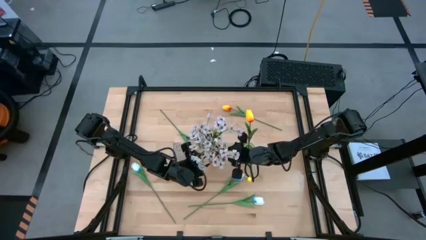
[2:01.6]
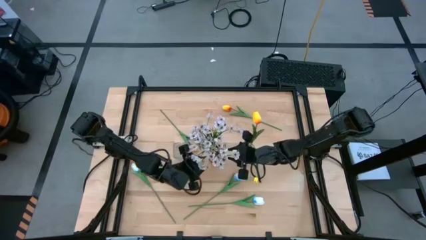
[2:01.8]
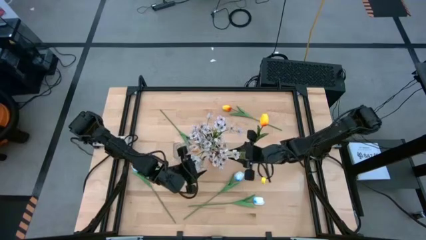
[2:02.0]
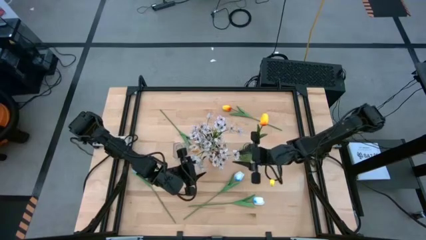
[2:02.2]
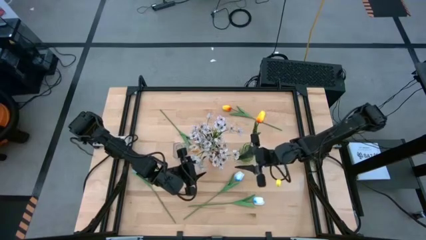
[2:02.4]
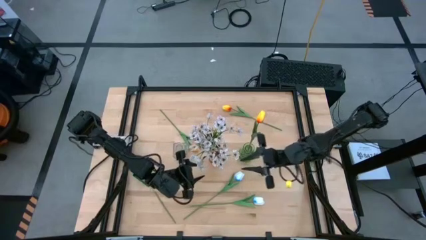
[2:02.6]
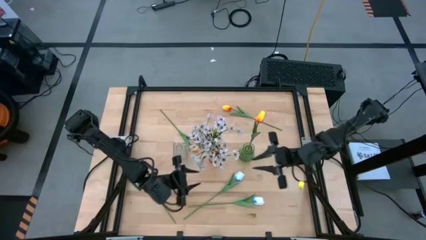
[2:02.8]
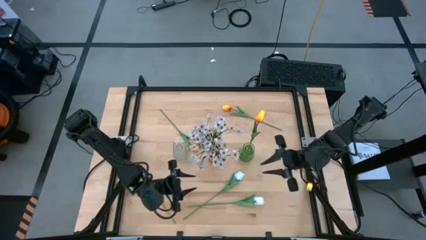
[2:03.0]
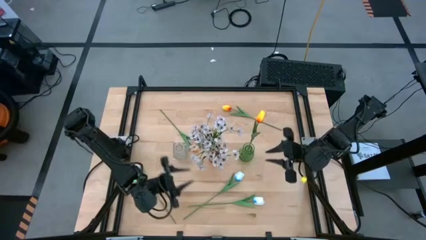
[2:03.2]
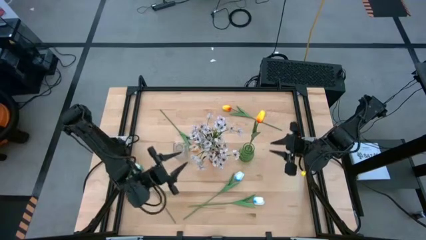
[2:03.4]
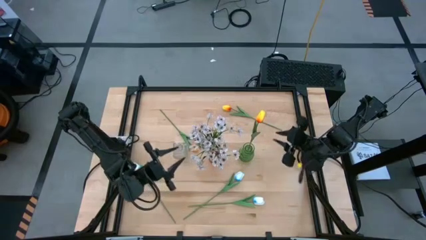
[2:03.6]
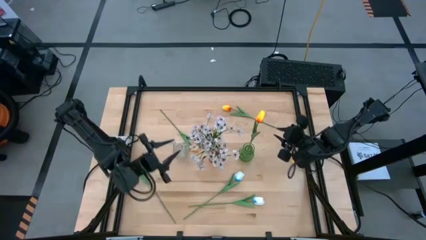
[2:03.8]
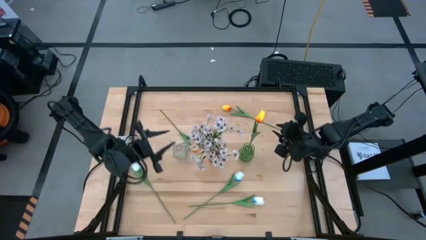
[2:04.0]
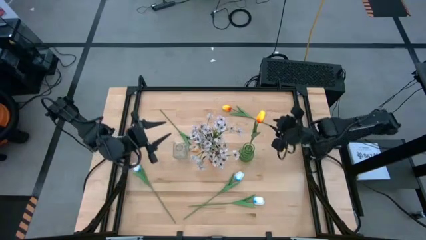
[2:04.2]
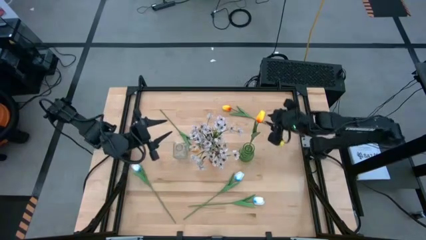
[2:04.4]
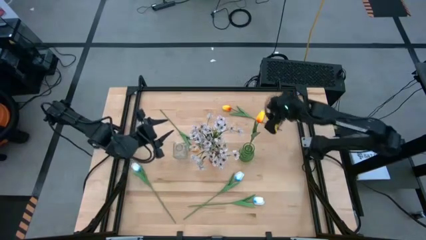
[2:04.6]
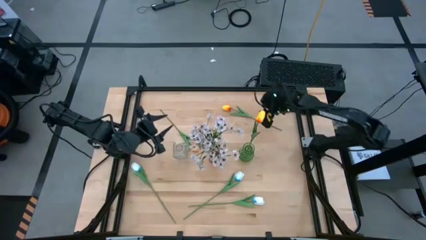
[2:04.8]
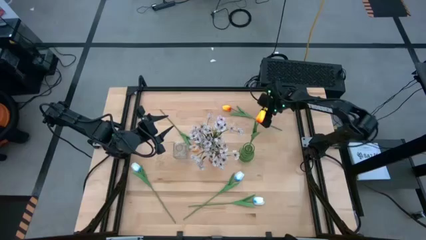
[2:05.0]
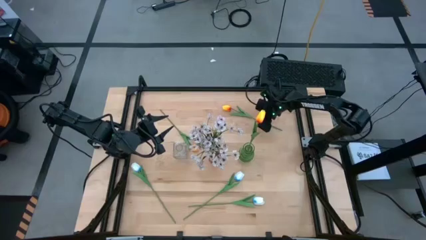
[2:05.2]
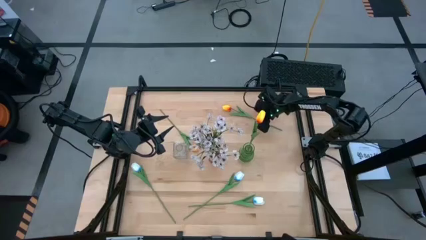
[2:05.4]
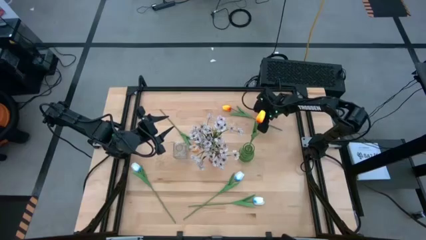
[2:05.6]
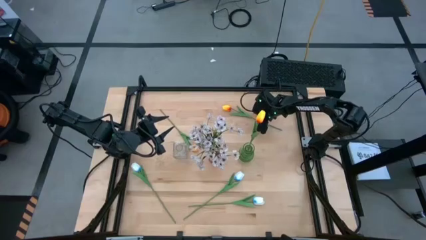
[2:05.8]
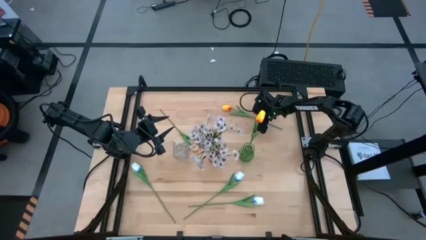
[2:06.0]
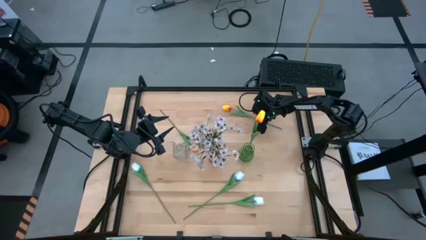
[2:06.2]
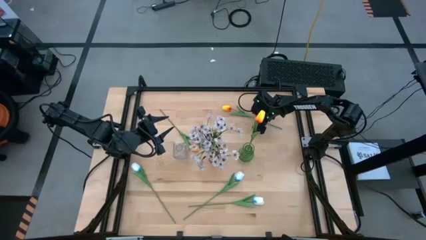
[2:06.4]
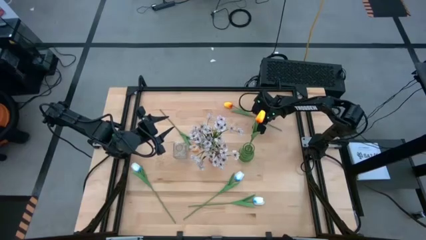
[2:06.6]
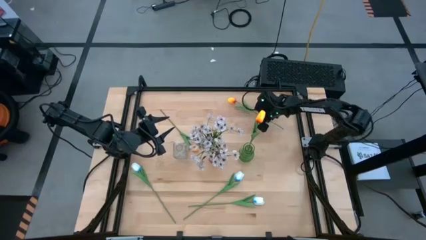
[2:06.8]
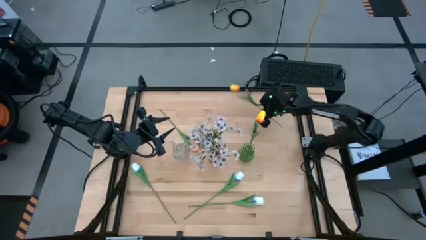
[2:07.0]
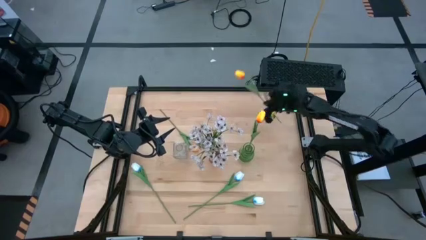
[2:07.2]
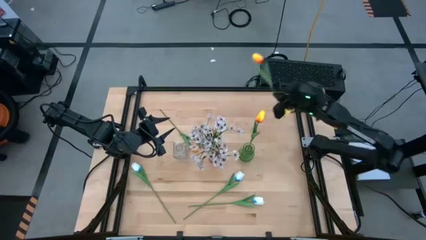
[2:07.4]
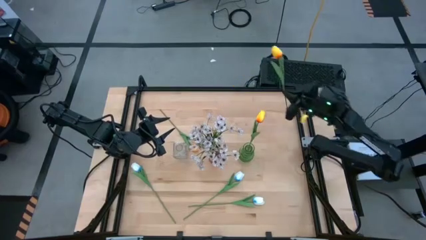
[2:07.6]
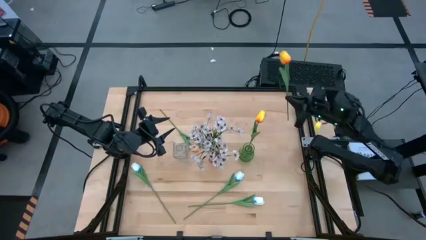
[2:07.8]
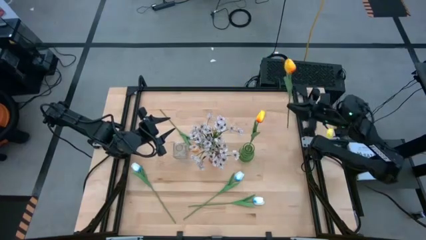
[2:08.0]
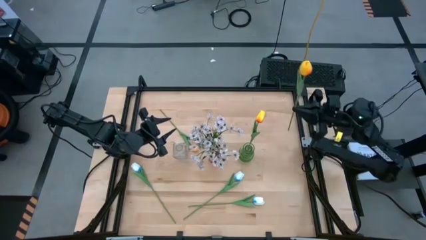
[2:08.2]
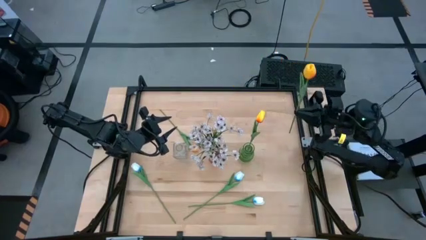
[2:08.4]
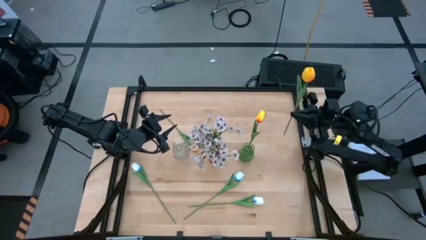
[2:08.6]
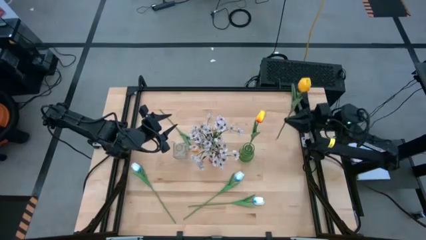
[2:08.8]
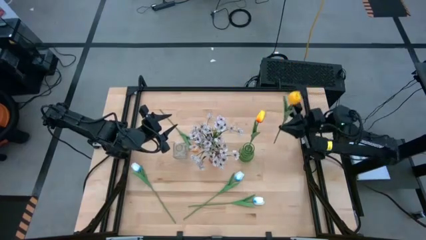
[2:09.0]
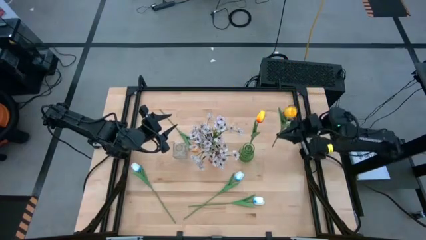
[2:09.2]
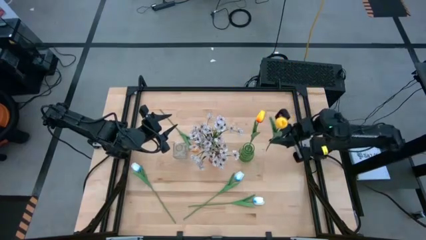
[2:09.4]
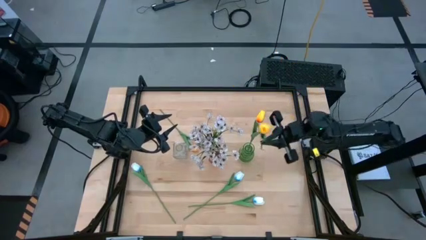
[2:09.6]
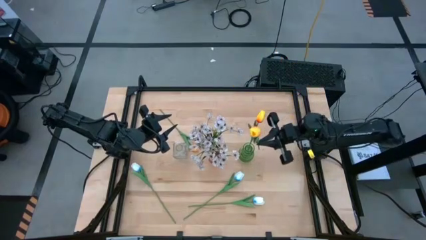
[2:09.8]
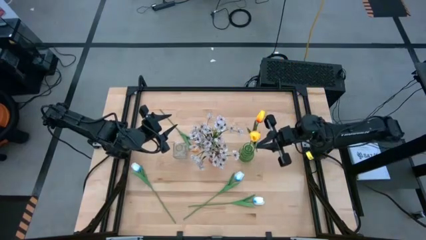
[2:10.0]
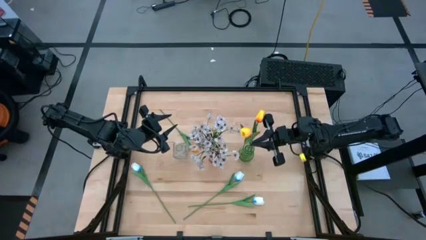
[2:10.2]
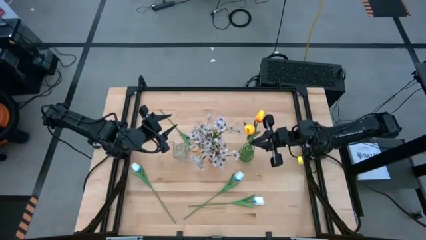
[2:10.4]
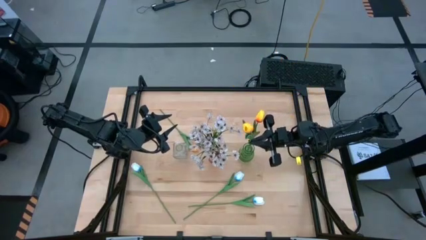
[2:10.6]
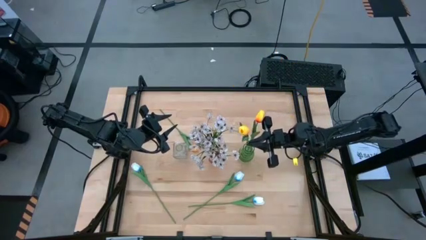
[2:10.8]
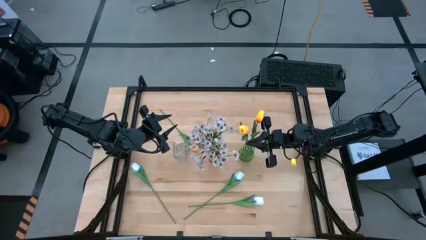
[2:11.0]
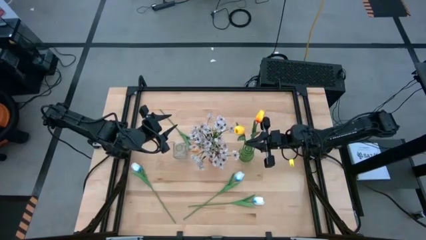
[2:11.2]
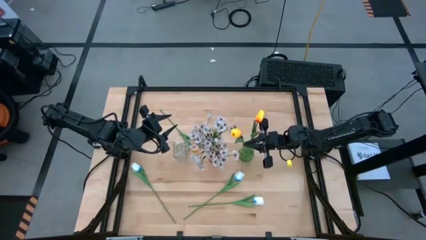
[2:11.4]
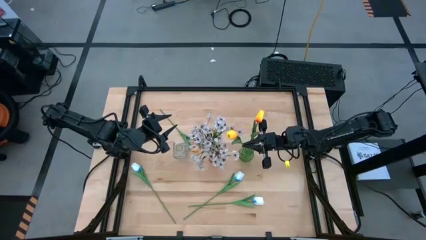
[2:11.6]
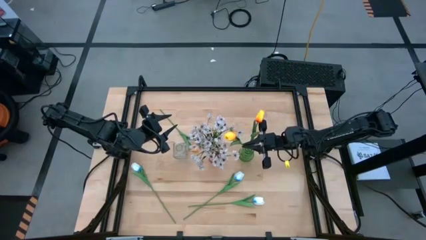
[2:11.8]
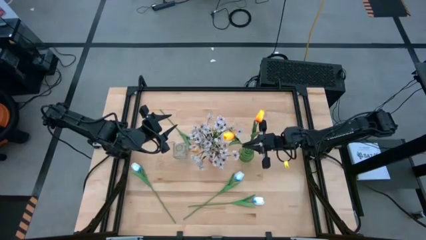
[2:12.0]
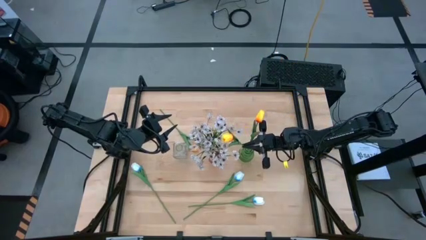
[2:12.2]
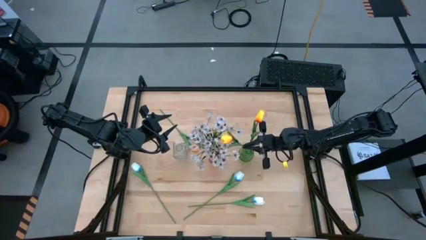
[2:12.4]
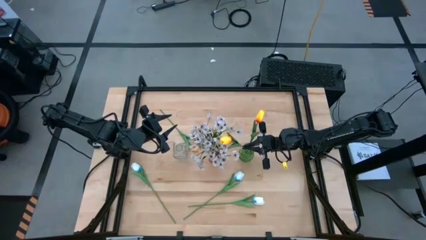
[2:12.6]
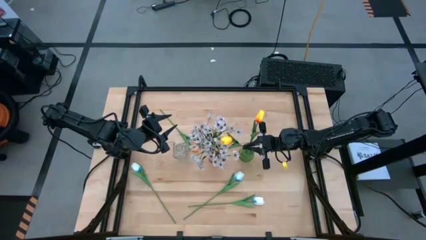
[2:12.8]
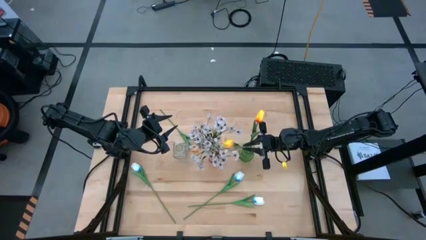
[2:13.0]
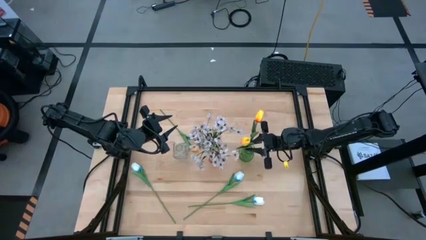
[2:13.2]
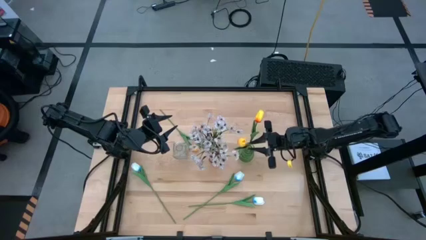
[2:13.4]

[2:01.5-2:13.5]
Task: Sort flowers into vase by color
Put the right yellow tulip into the green vase

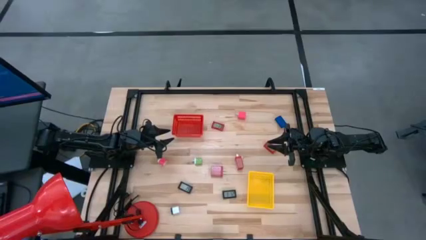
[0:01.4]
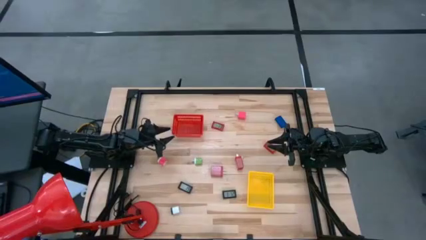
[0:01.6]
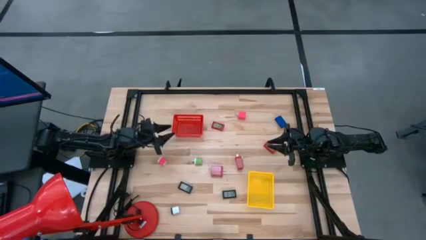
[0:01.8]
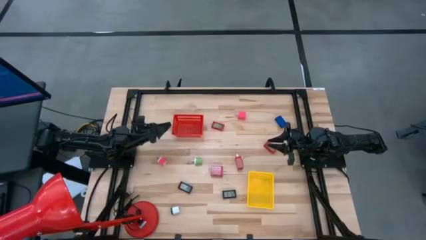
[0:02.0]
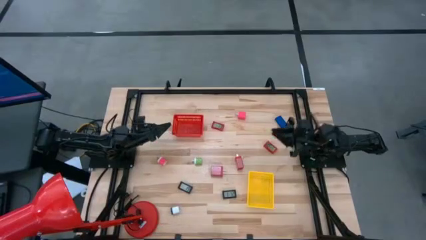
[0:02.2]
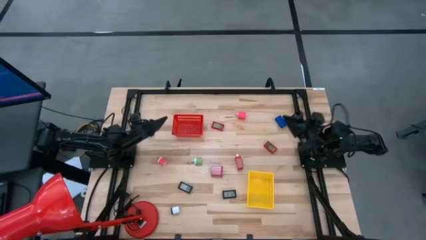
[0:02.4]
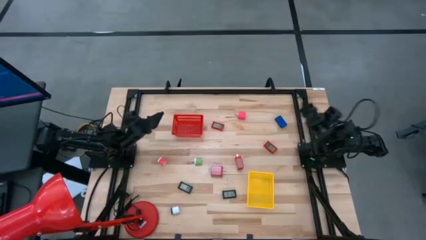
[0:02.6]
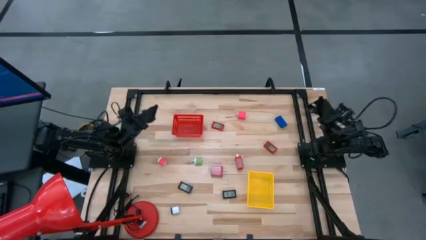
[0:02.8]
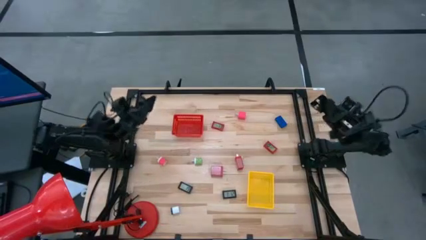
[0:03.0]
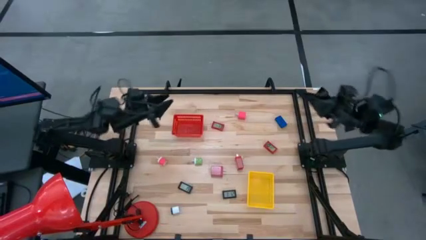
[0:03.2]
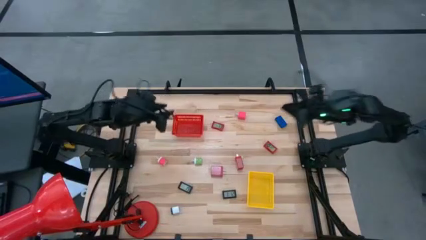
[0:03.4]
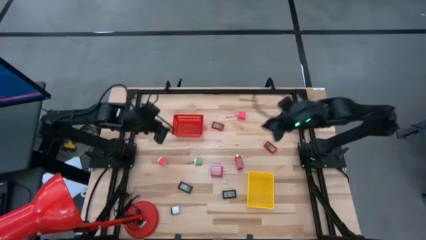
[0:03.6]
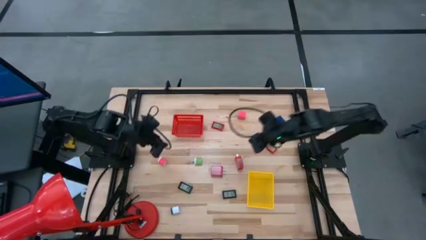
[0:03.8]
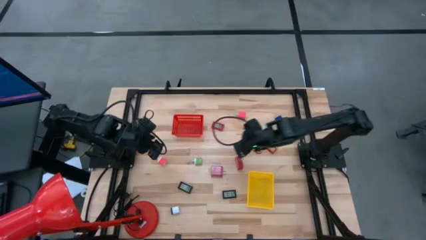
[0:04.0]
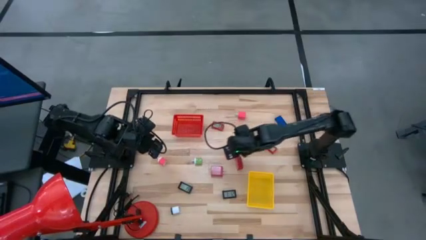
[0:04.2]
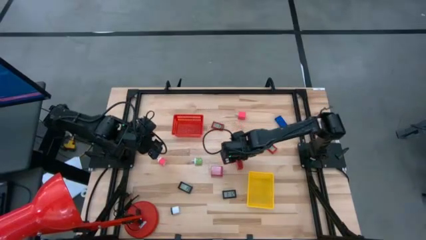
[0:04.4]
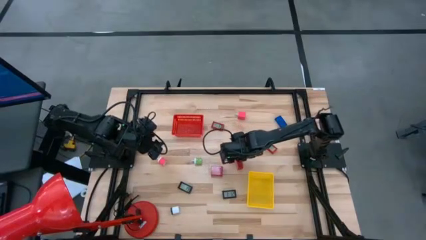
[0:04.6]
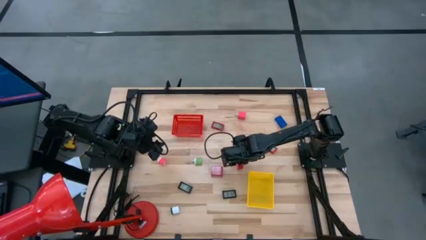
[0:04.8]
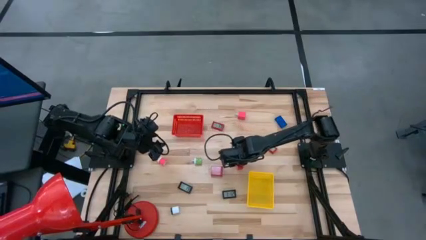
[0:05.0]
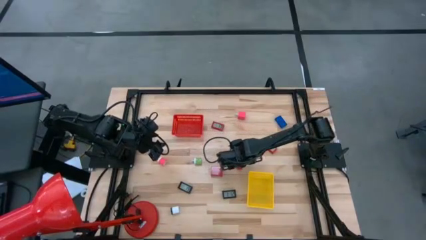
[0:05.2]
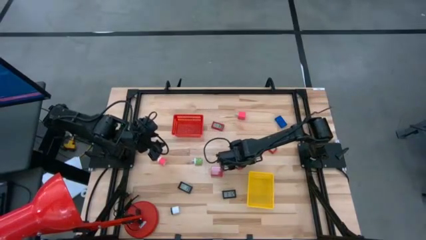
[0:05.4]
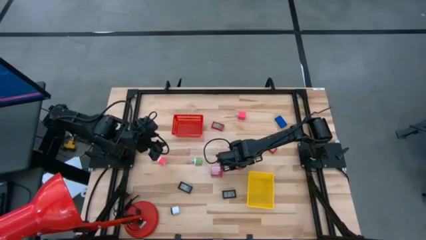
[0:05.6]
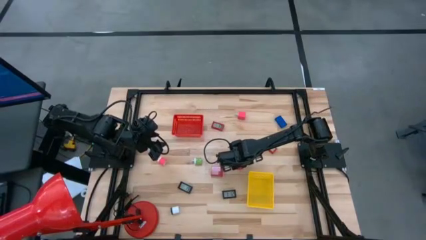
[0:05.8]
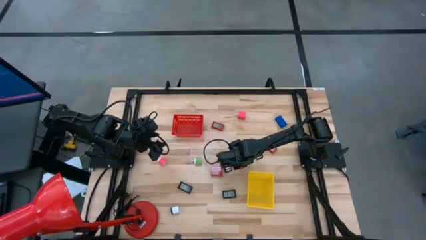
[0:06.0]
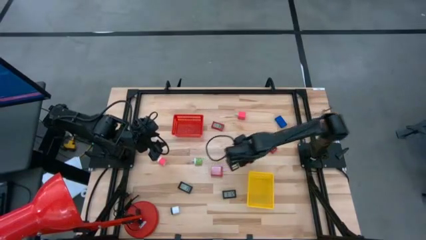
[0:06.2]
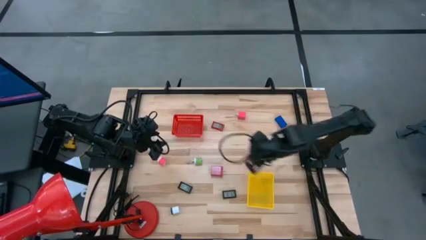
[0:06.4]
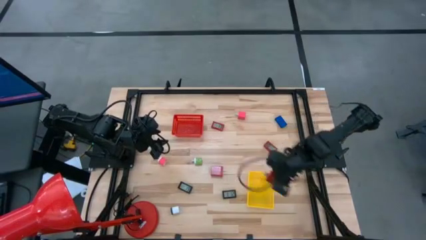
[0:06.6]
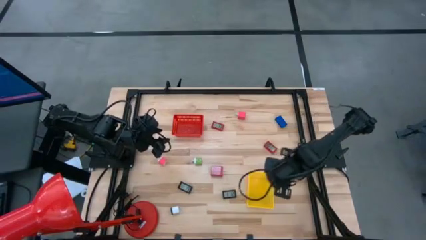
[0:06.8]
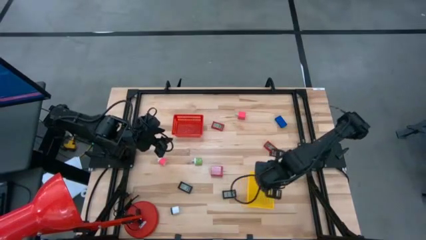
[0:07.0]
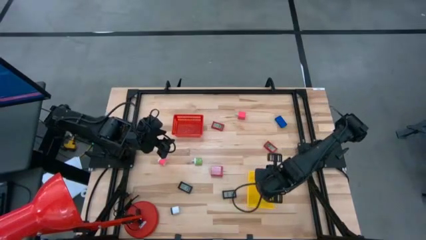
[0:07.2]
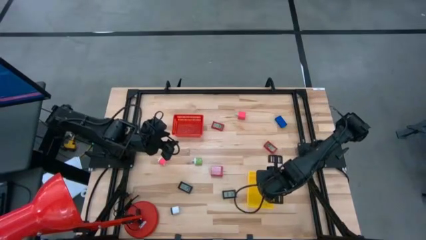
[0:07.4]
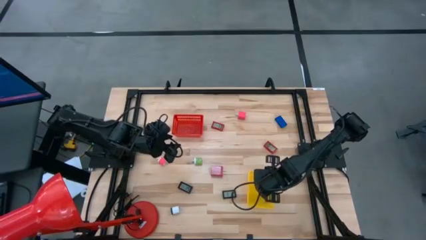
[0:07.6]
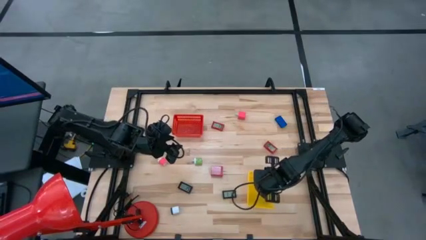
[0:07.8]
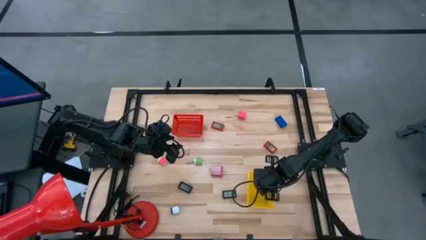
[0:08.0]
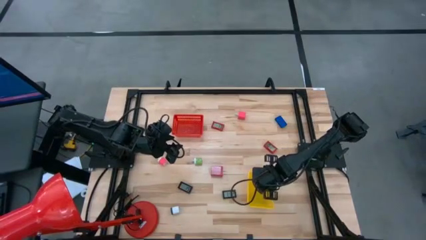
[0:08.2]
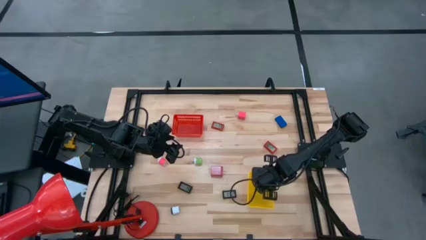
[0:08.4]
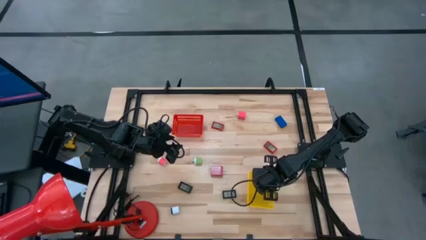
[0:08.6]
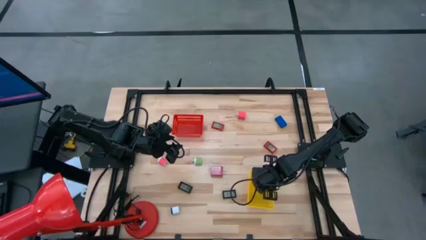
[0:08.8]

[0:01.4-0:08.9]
Task: Pick & Place Office items
Put the right red charger adapter into the yellow basket
